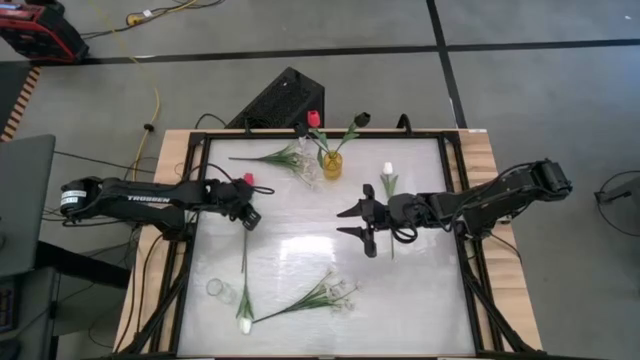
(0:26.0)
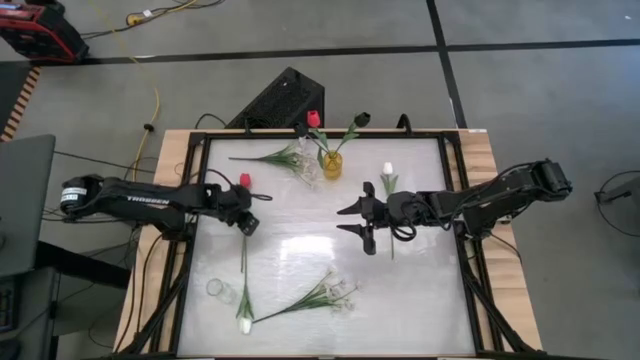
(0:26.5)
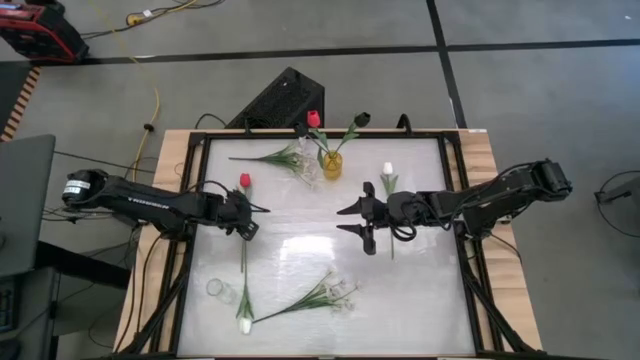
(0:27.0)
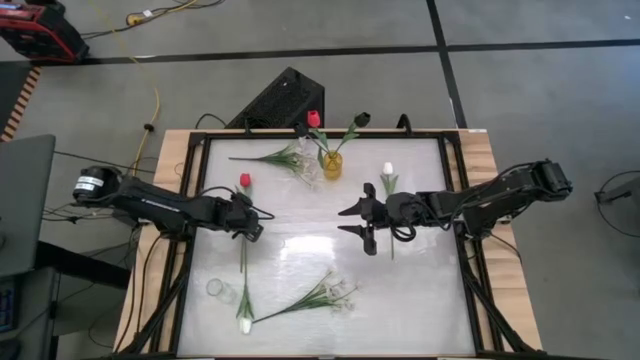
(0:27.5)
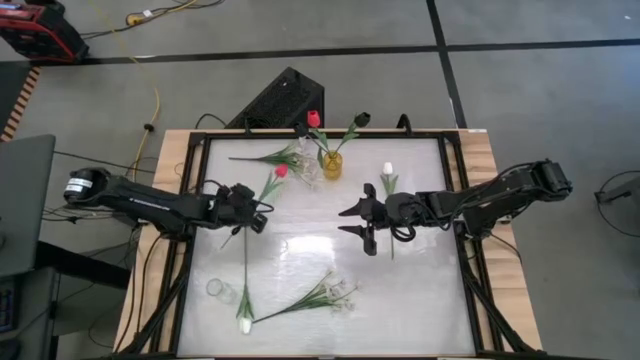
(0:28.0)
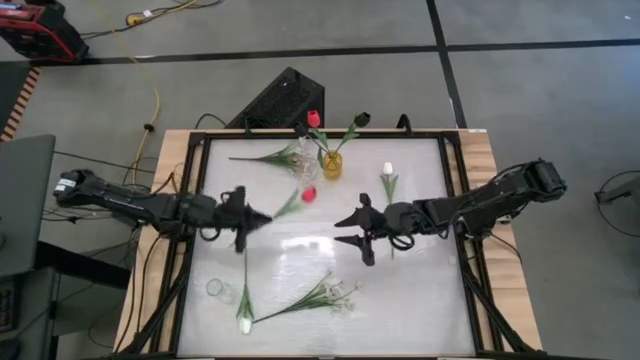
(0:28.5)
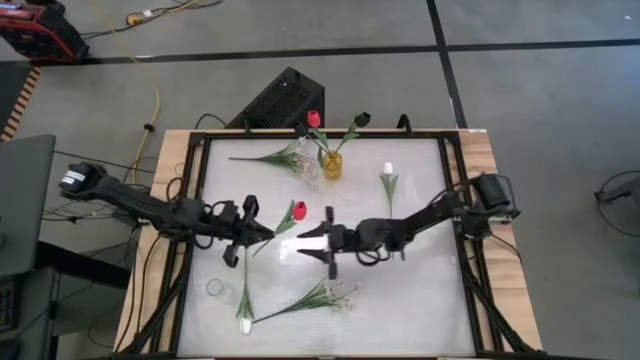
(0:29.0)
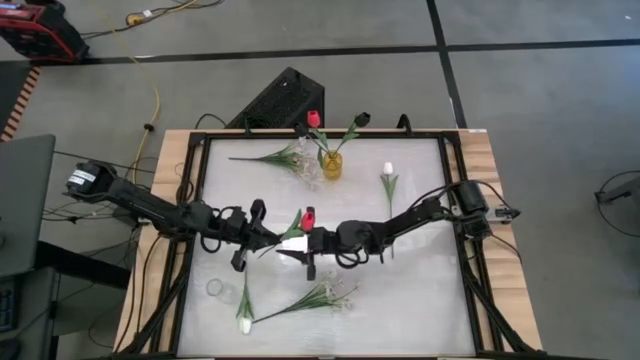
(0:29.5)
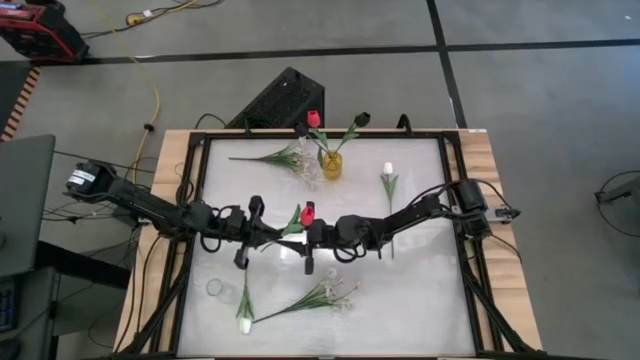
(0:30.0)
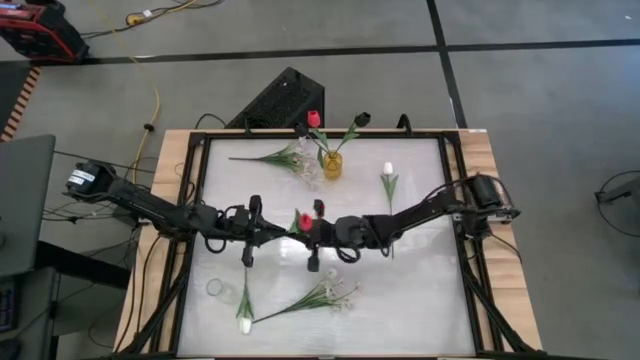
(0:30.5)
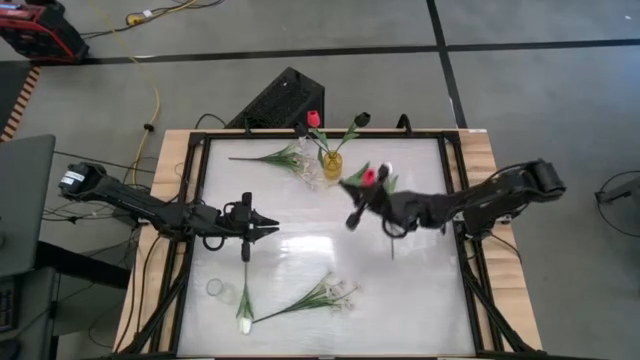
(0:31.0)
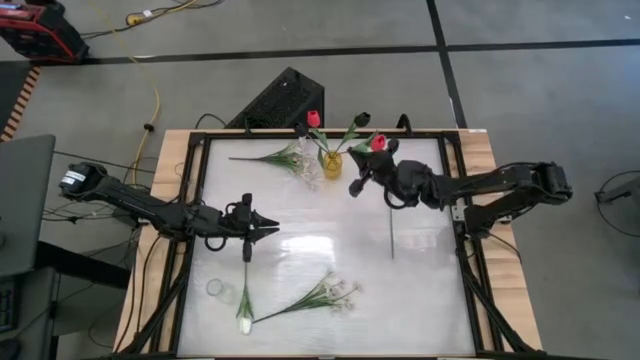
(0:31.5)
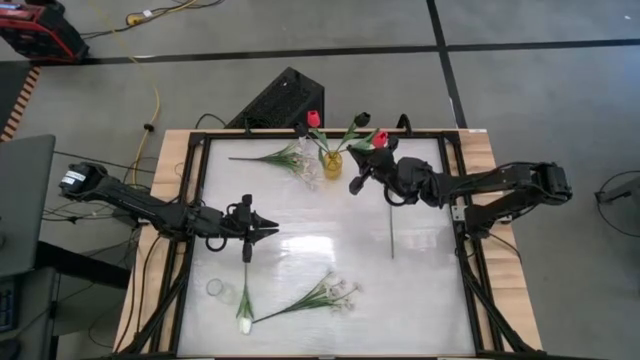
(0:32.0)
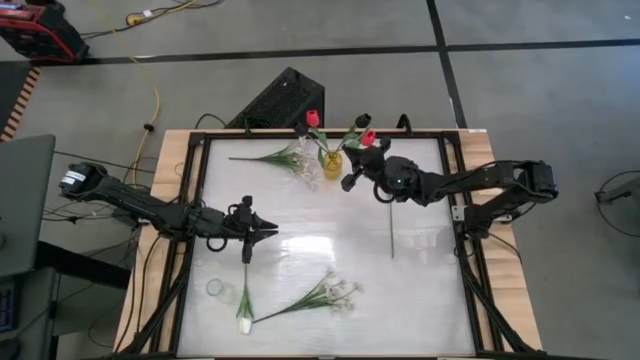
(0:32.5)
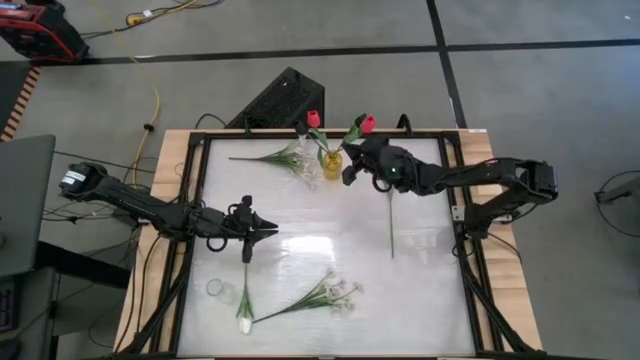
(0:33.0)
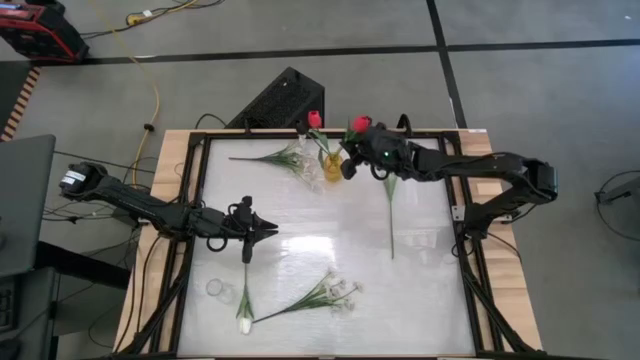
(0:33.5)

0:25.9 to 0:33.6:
Task: Sort flowers into vase by color
Put the red flower into the yellow vase

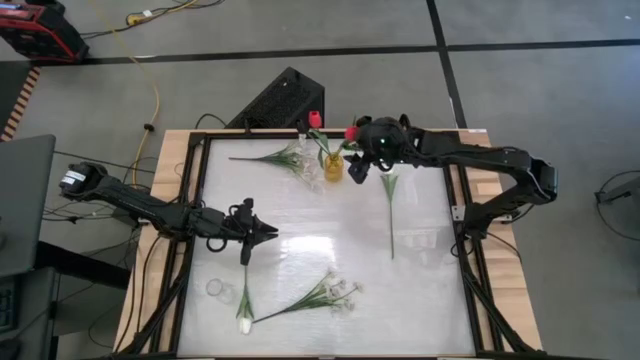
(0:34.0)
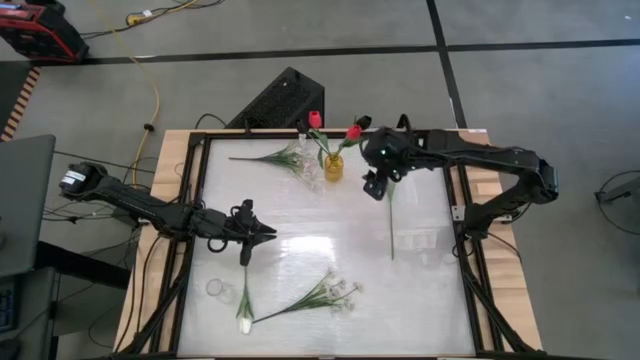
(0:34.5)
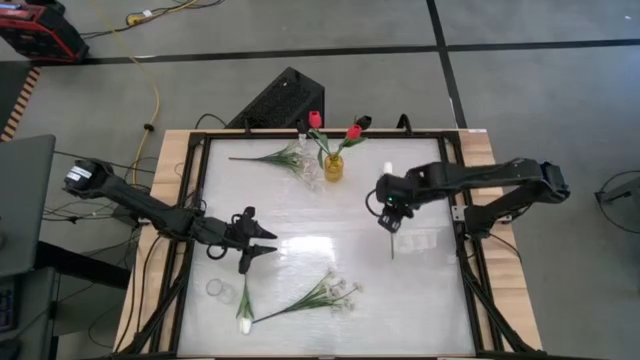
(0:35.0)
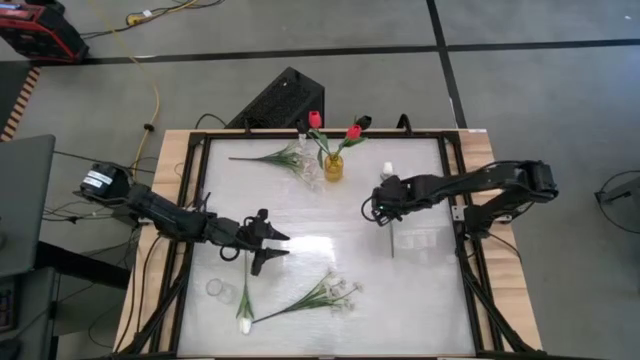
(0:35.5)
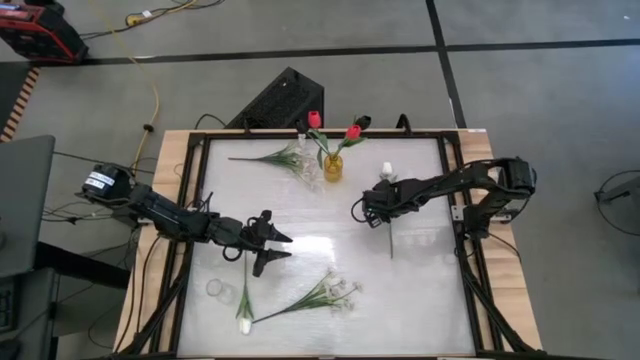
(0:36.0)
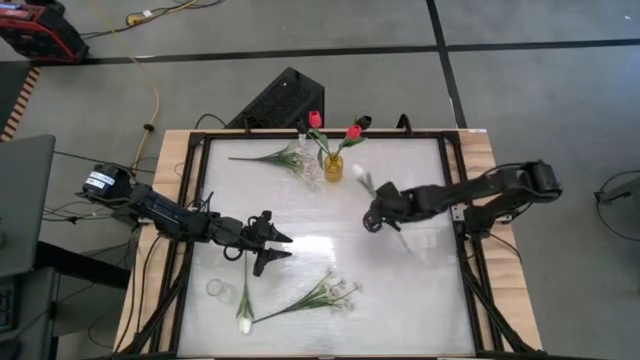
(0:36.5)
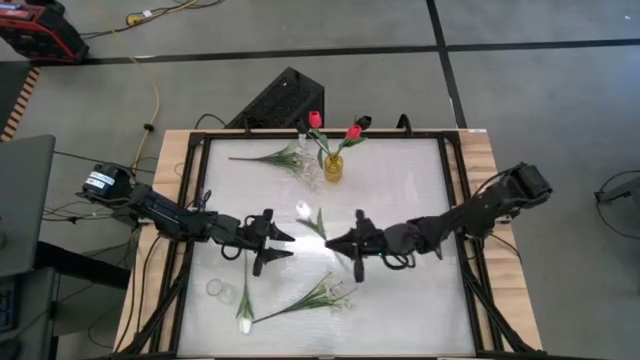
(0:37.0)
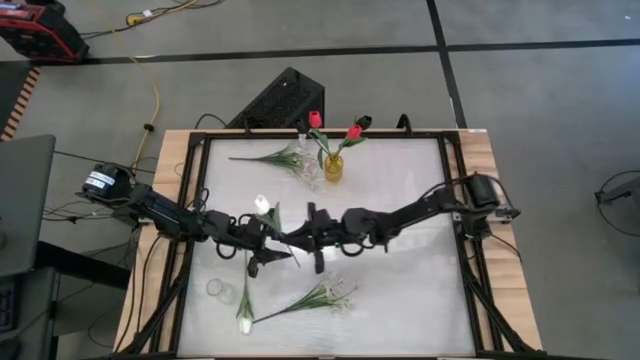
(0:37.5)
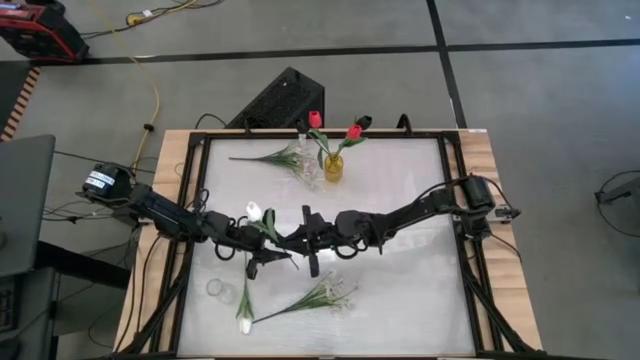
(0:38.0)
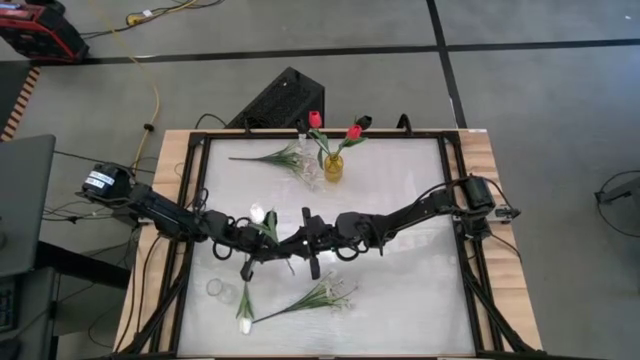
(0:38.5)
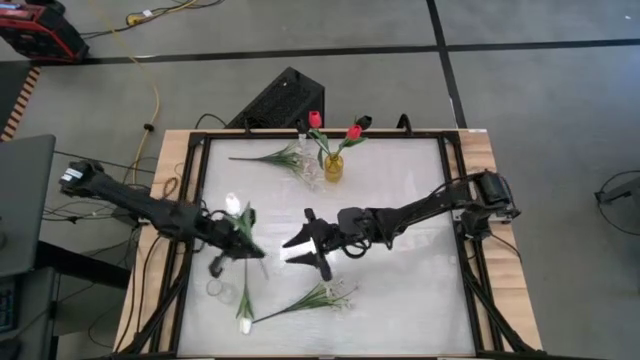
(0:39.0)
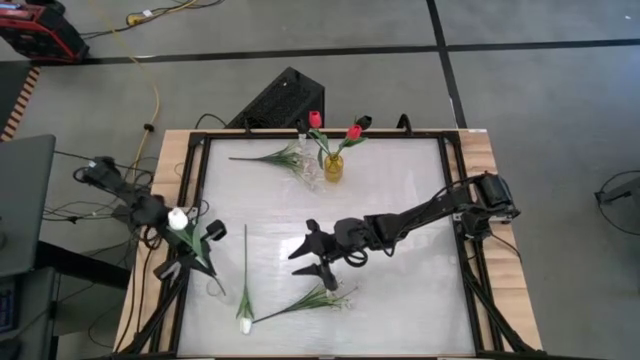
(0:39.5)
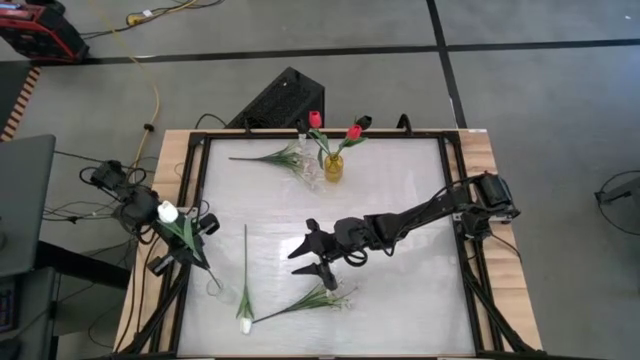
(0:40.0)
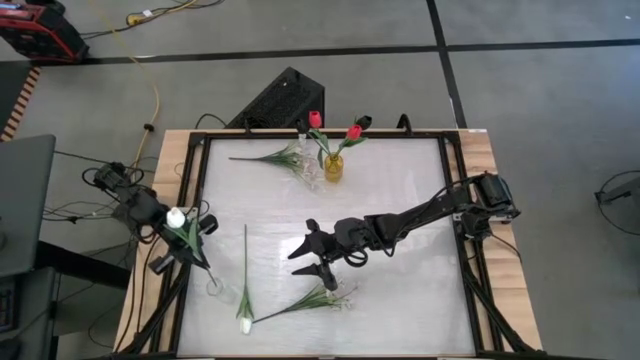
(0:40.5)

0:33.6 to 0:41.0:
Put the top white flower into the transparent vase

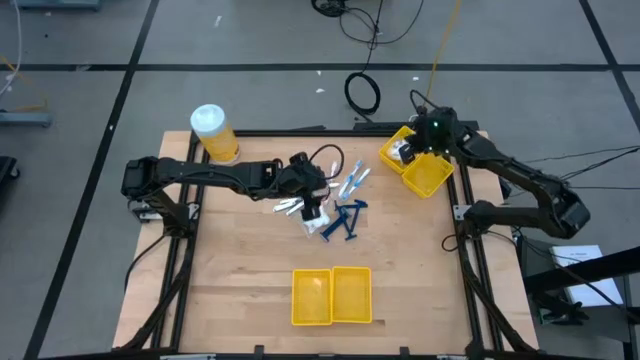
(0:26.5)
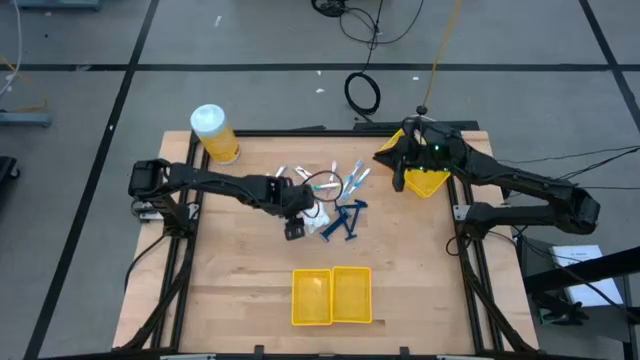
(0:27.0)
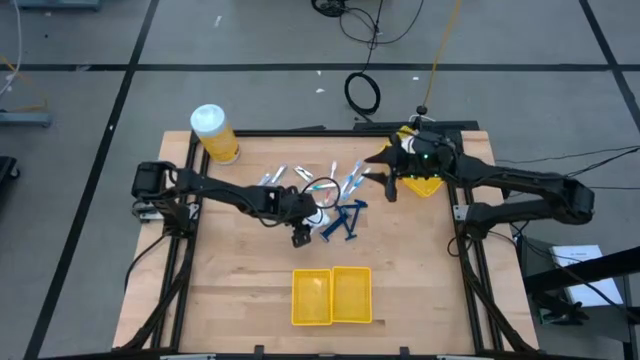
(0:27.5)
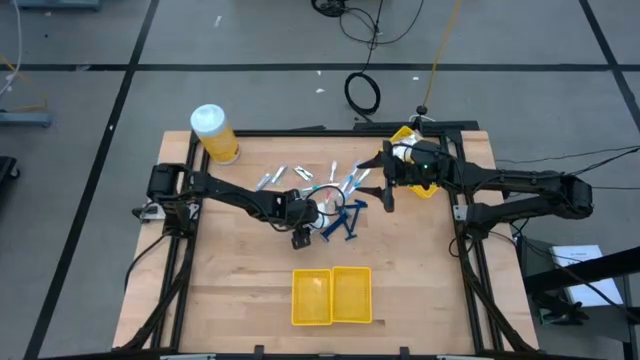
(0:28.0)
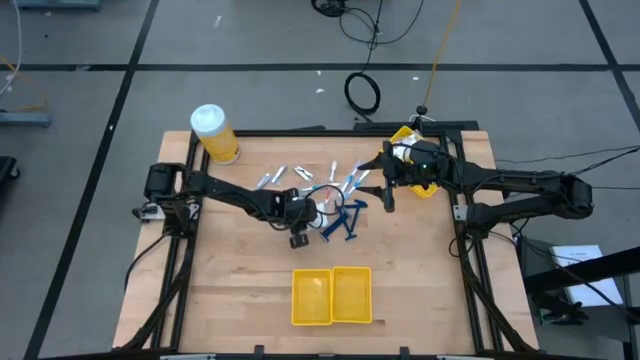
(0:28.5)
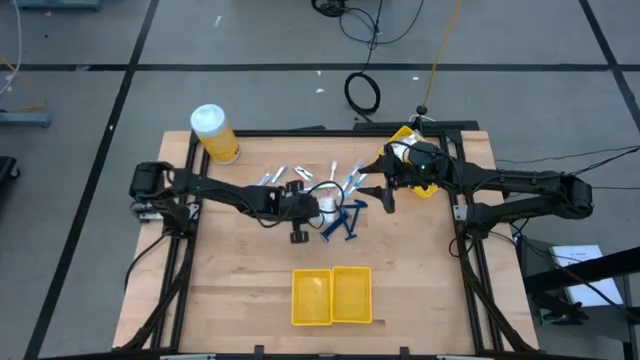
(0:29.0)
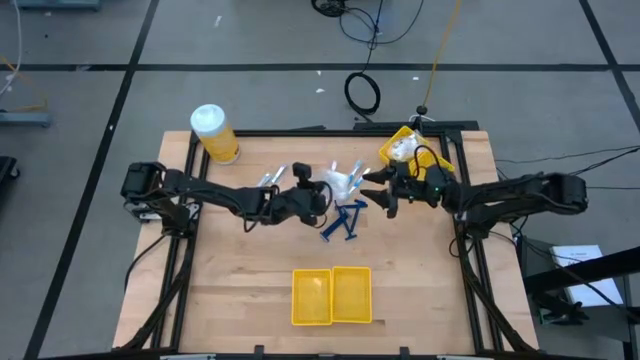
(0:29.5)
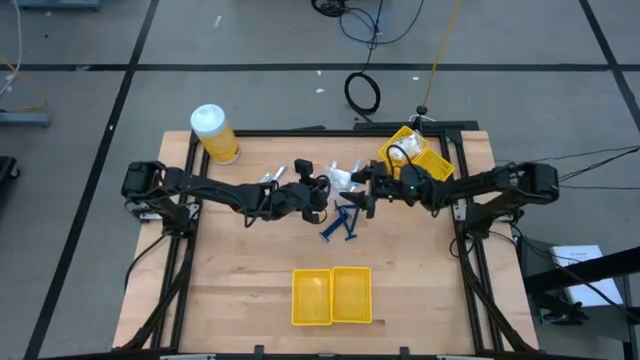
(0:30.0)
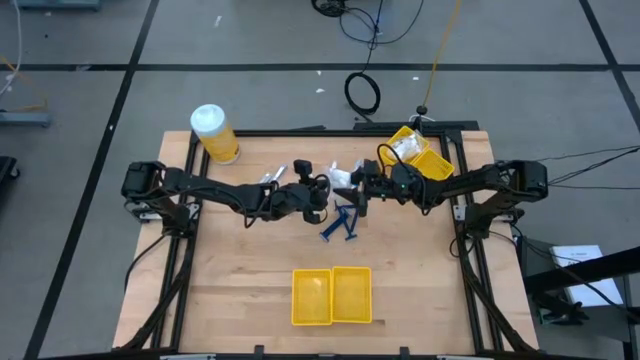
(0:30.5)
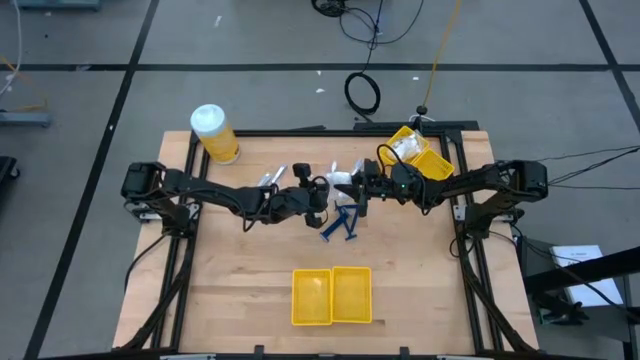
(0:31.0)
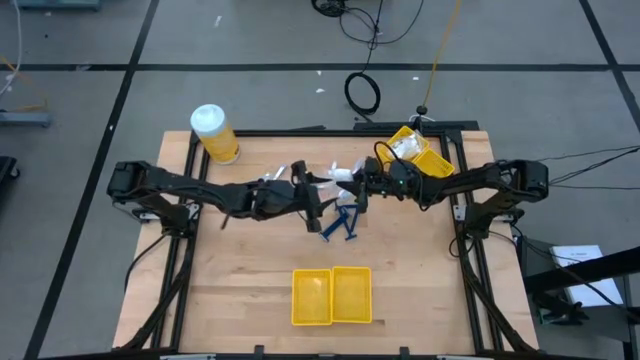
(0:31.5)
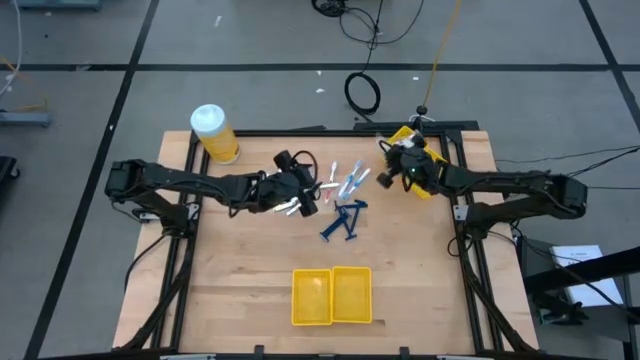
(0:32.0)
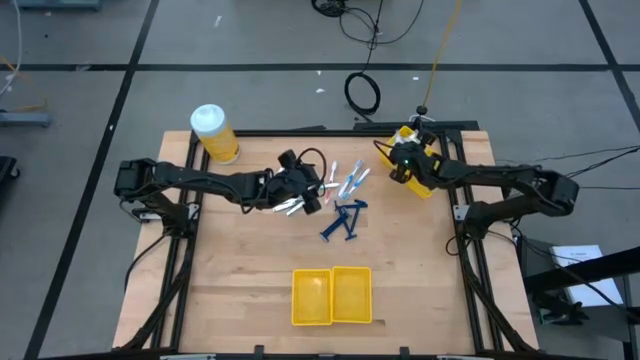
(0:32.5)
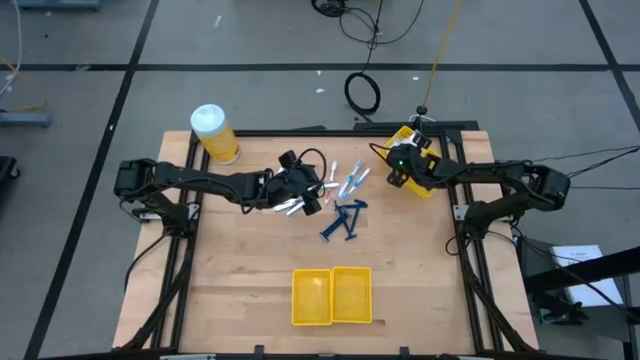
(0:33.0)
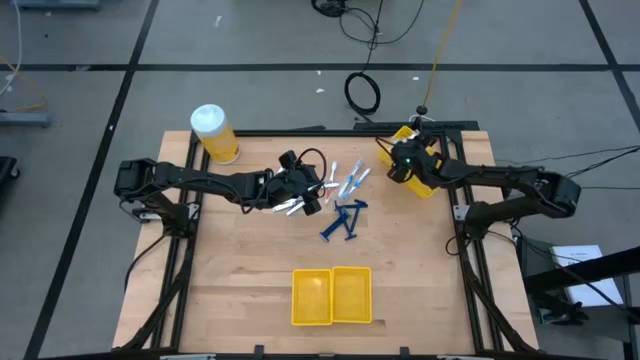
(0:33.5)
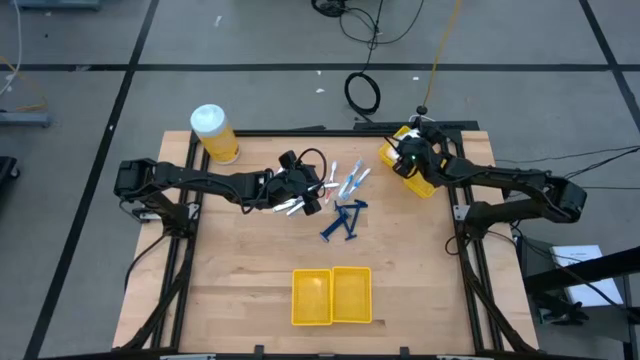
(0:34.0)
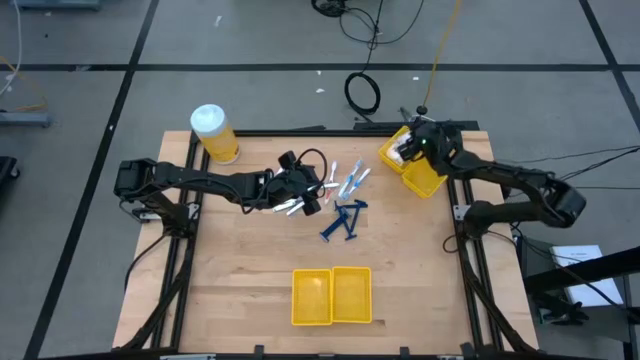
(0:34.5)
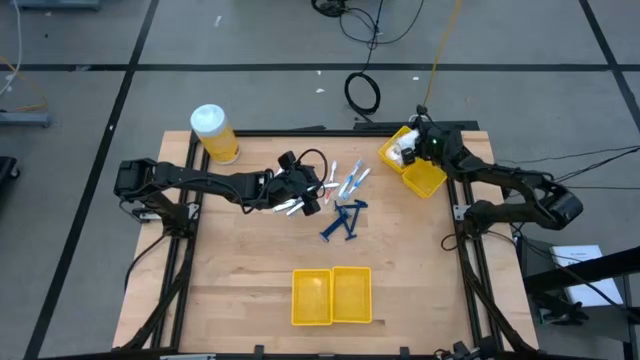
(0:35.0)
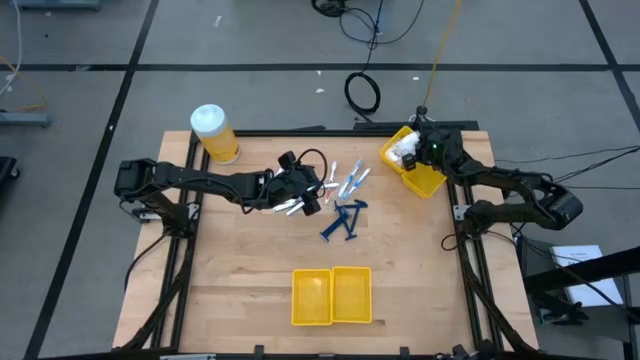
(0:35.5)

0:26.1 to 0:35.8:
Task: Pick & Place Travel size toiletries
Put the white cotton pack into the top left yellow bin
